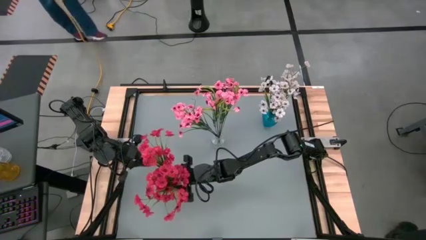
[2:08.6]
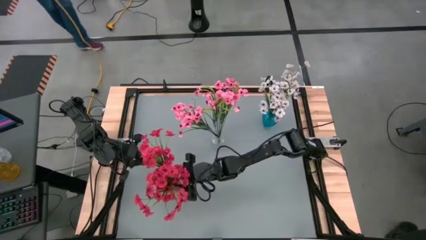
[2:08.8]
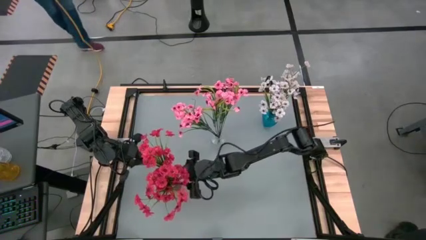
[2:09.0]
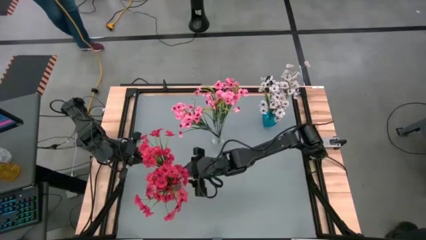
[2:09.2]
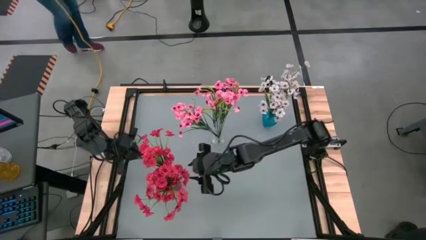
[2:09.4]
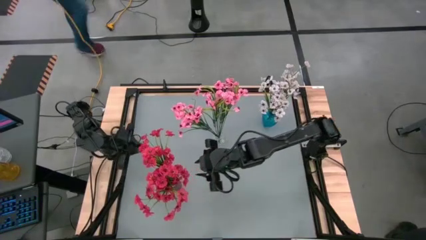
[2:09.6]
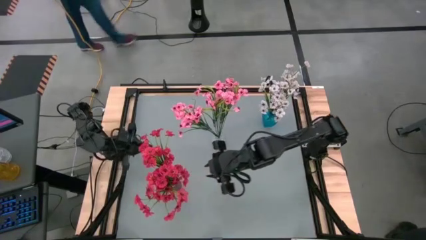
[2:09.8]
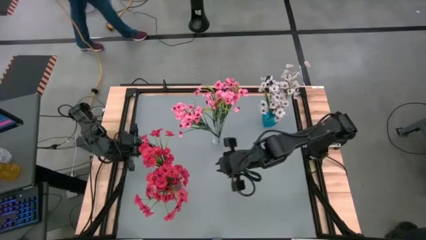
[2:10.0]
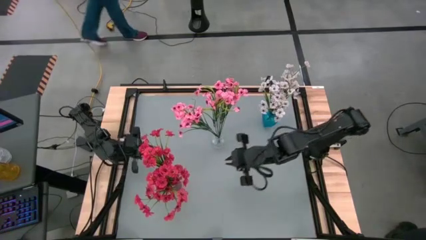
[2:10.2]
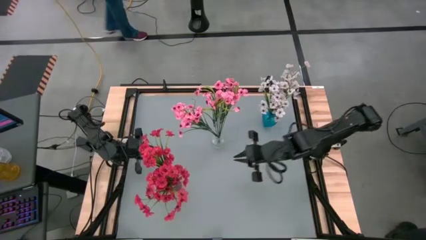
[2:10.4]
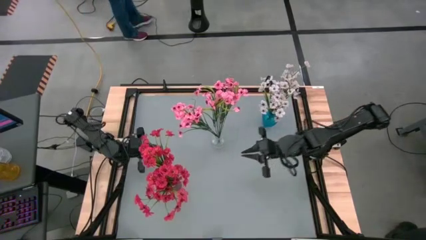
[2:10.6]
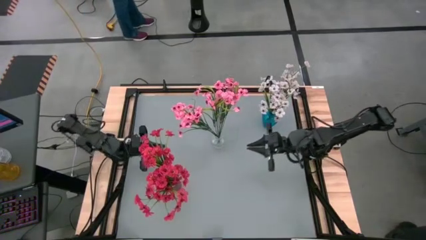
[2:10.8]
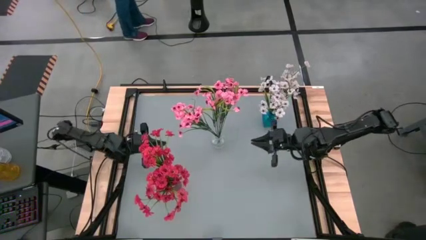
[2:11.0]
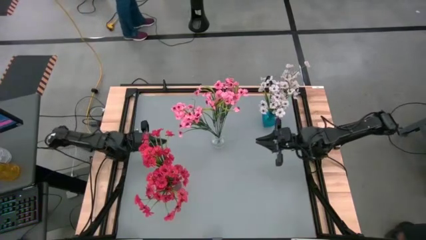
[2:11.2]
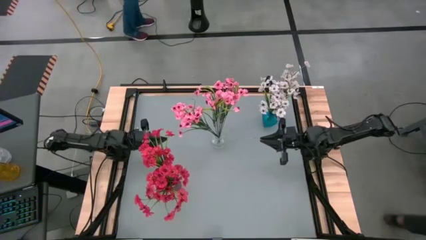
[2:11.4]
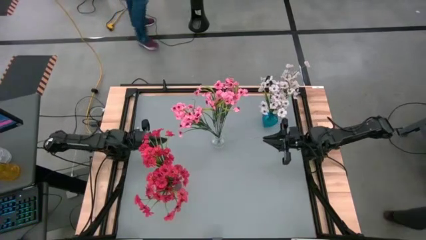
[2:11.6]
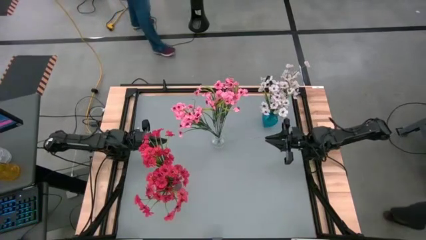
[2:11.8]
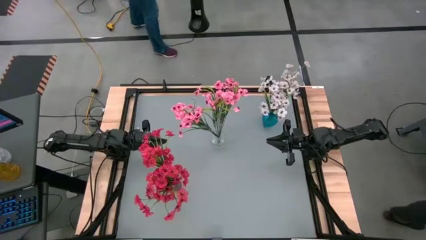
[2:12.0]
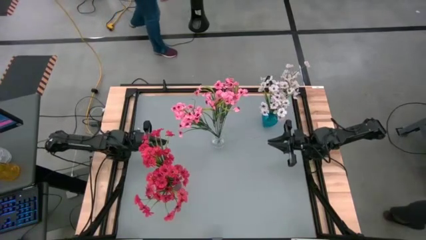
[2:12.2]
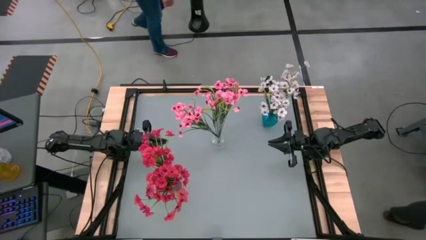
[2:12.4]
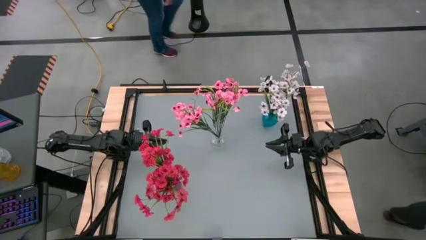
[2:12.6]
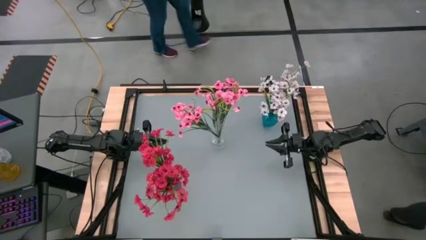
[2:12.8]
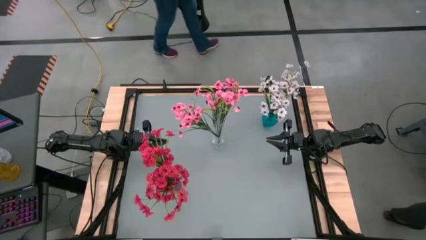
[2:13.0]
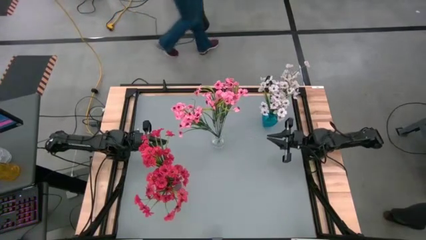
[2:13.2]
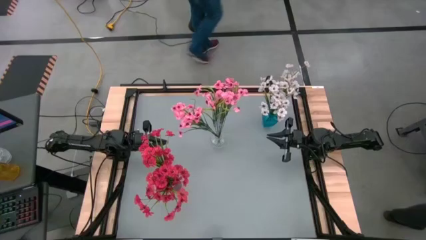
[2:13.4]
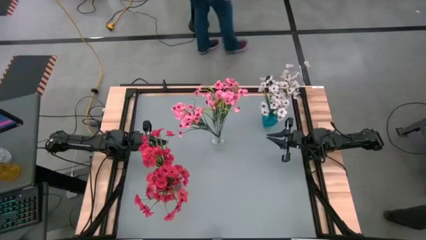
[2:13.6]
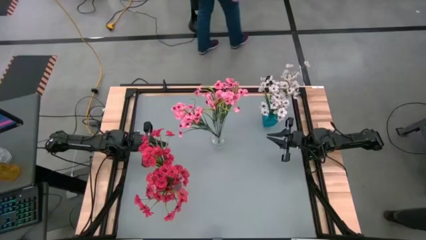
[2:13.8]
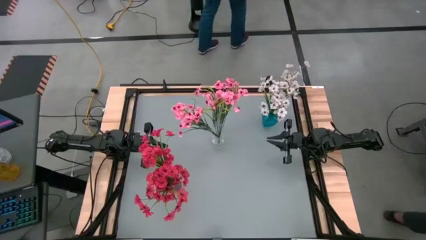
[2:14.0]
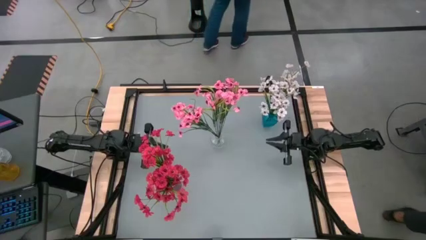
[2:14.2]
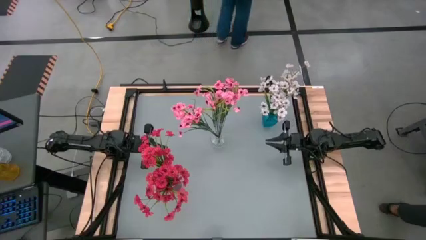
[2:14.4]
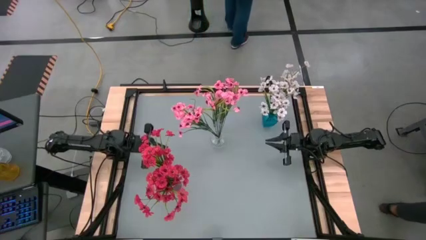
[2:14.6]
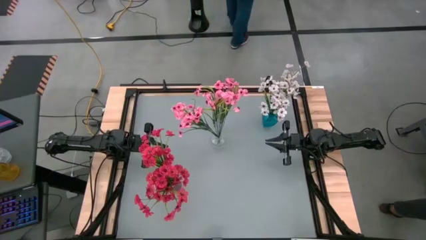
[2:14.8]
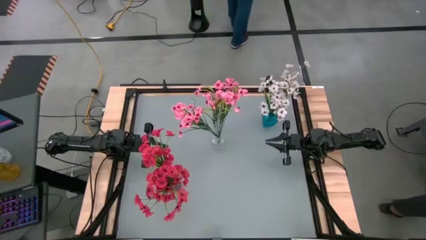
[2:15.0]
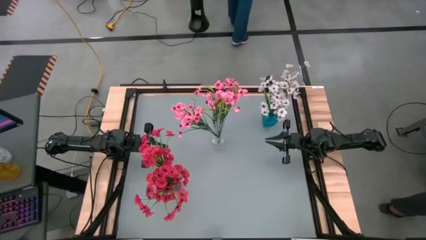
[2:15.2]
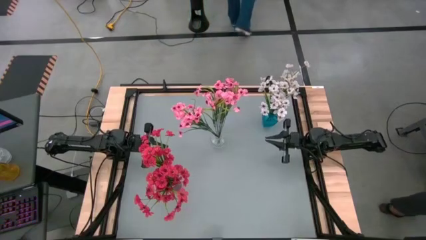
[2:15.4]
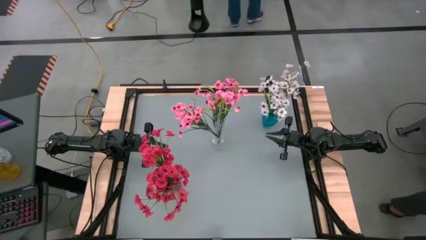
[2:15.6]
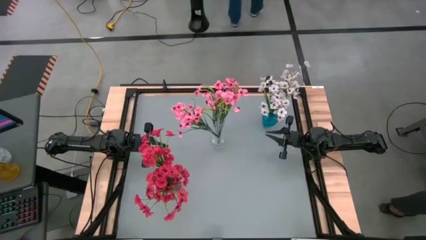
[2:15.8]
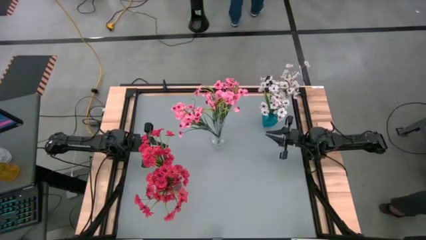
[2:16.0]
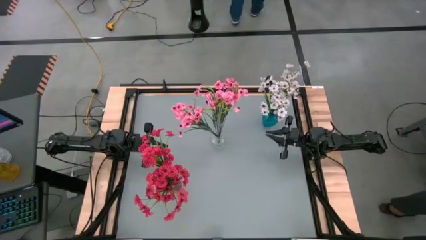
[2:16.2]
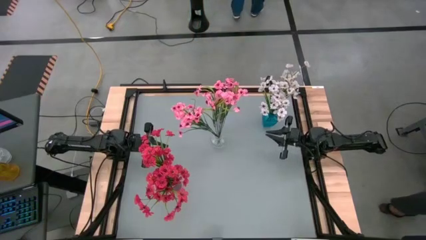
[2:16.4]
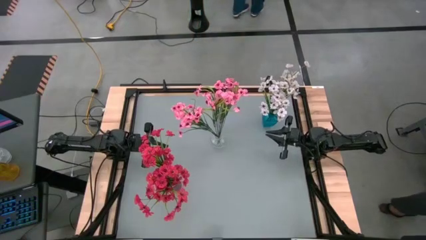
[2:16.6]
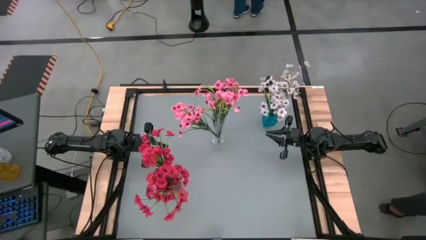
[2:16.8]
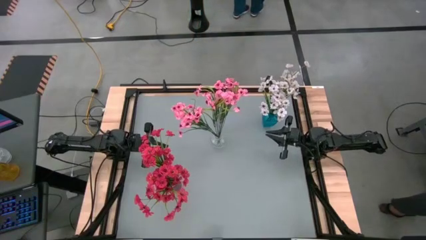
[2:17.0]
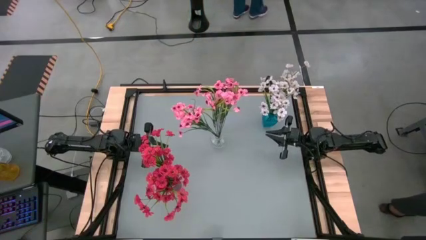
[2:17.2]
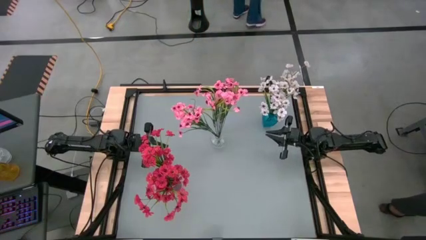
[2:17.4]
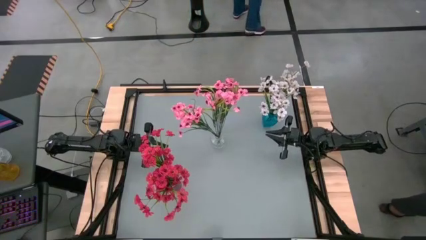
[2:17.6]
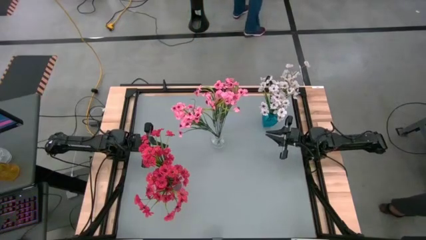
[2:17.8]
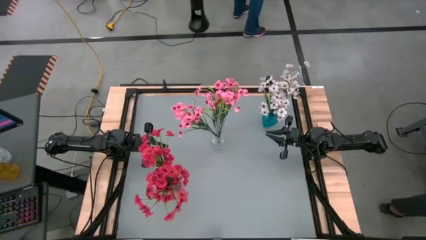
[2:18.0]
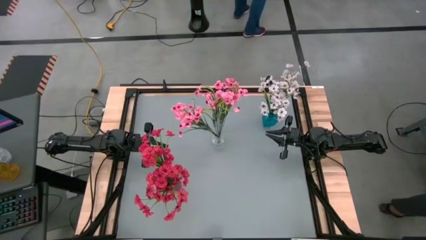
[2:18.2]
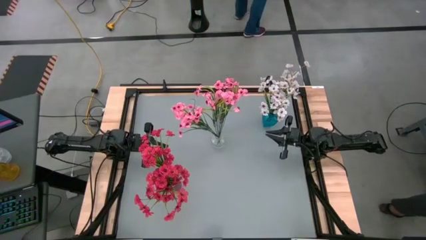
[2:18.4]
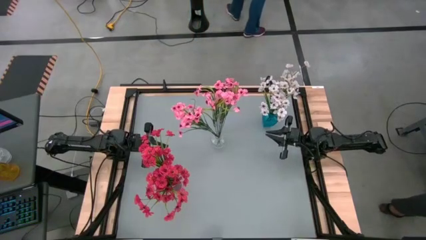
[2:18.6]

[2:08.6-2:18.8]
Task: Sort flowers into vase by color
Return to home position

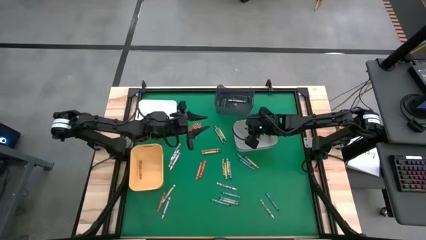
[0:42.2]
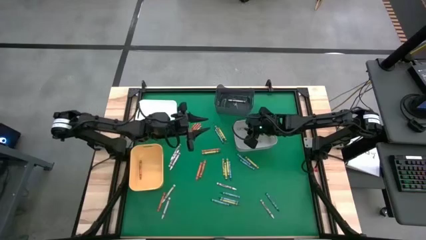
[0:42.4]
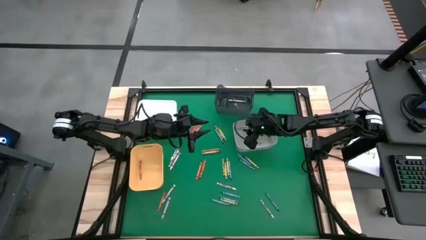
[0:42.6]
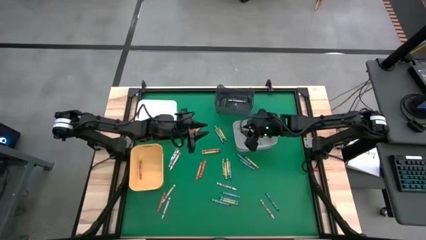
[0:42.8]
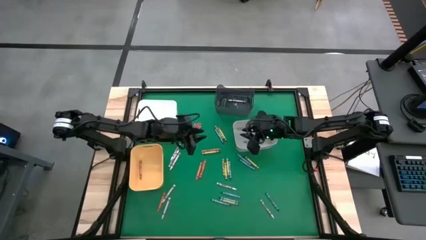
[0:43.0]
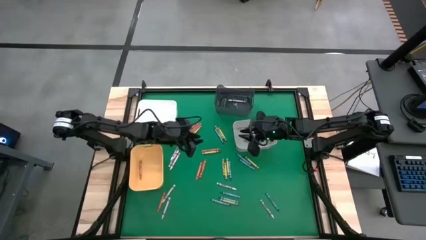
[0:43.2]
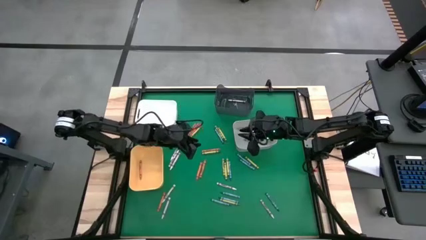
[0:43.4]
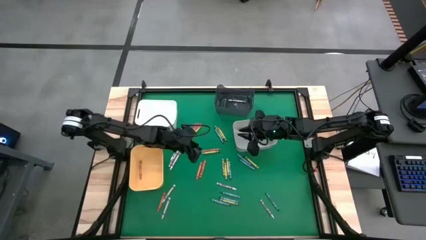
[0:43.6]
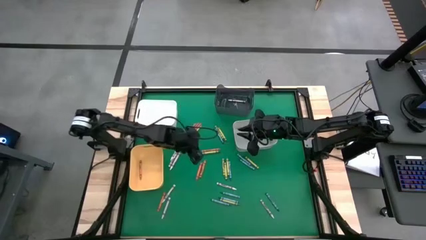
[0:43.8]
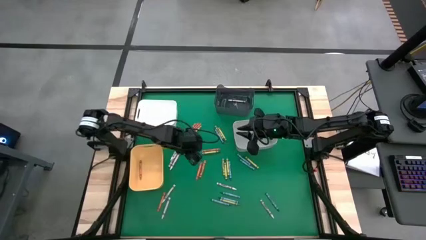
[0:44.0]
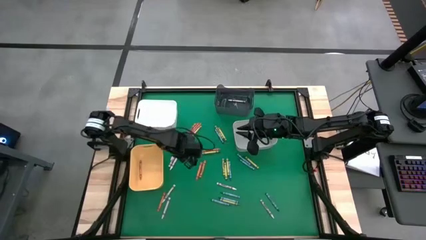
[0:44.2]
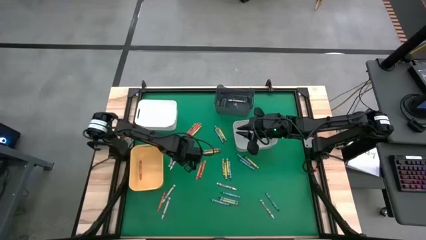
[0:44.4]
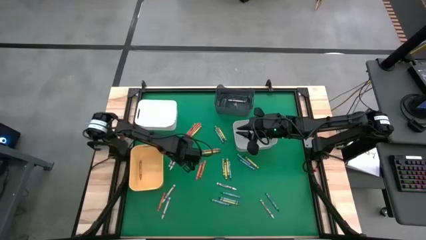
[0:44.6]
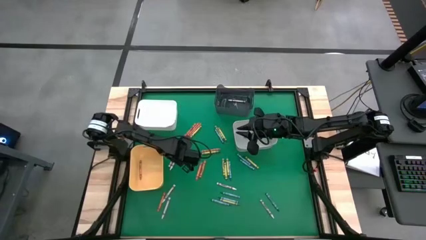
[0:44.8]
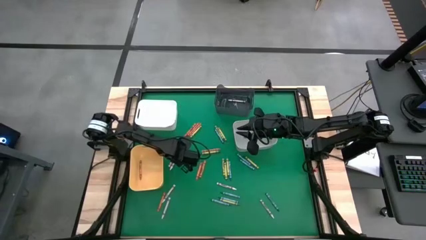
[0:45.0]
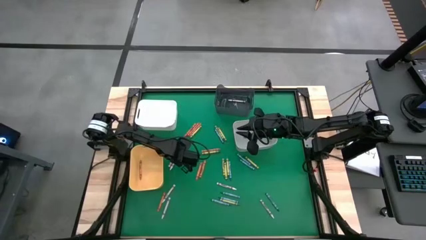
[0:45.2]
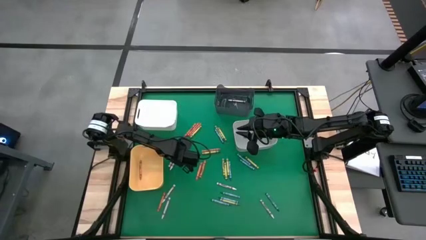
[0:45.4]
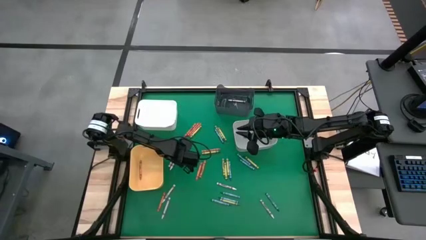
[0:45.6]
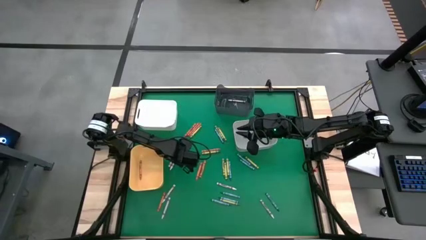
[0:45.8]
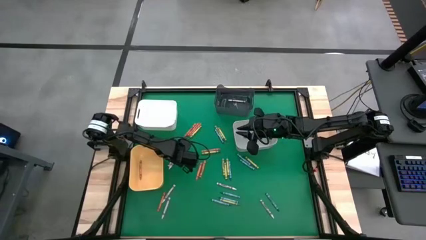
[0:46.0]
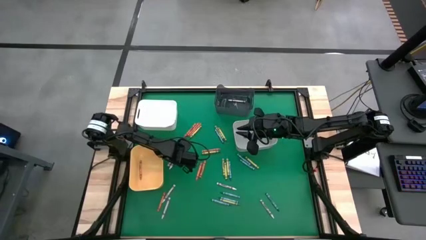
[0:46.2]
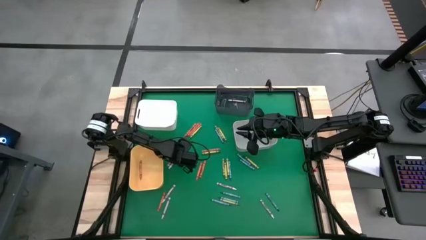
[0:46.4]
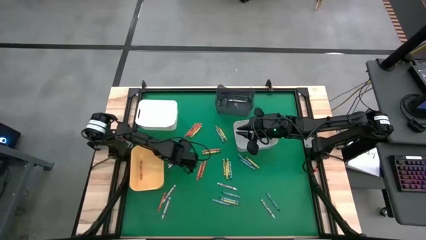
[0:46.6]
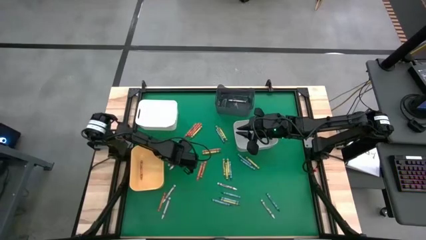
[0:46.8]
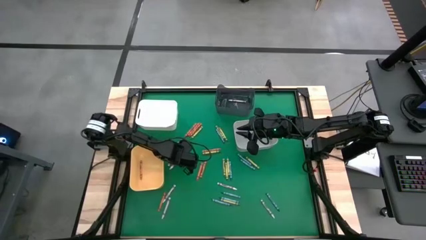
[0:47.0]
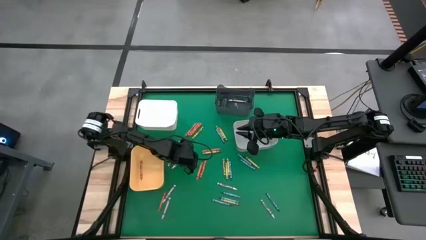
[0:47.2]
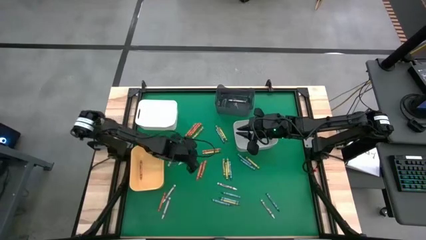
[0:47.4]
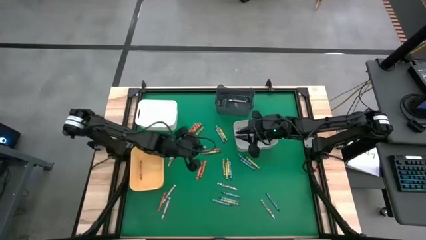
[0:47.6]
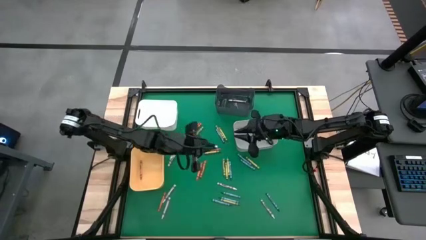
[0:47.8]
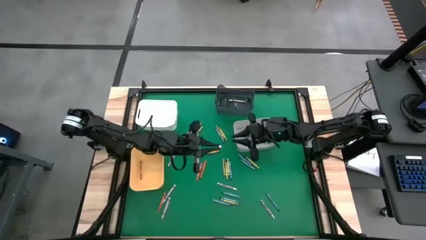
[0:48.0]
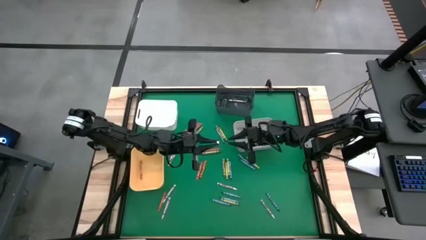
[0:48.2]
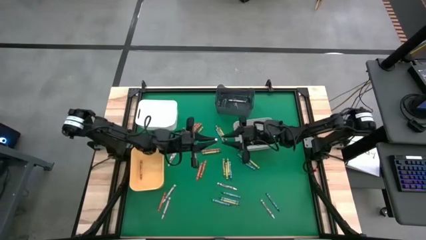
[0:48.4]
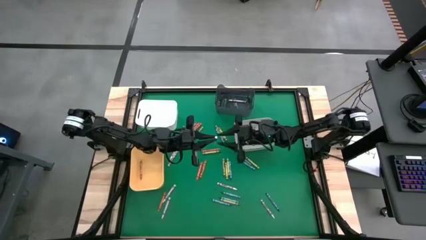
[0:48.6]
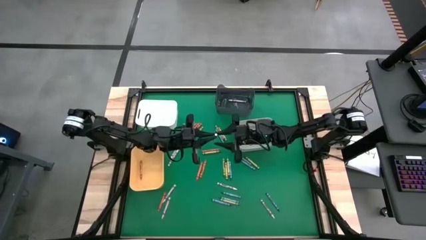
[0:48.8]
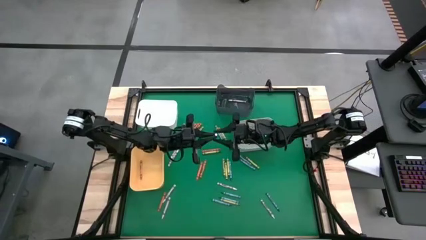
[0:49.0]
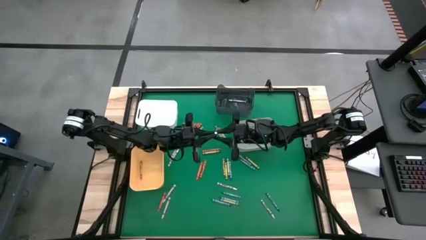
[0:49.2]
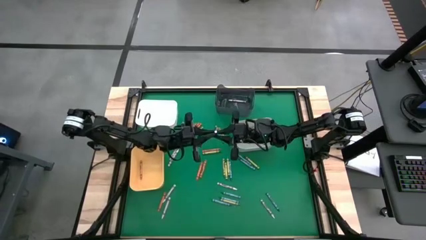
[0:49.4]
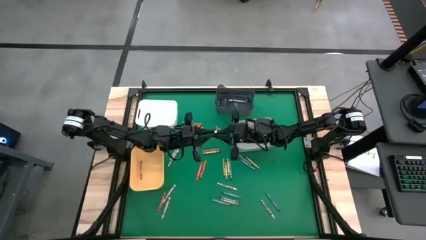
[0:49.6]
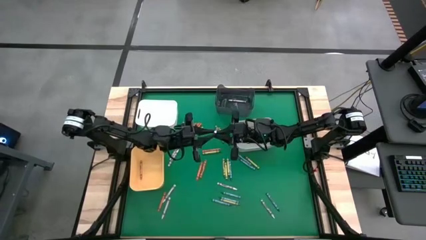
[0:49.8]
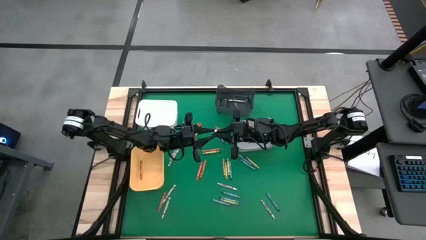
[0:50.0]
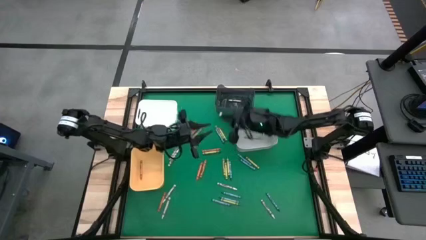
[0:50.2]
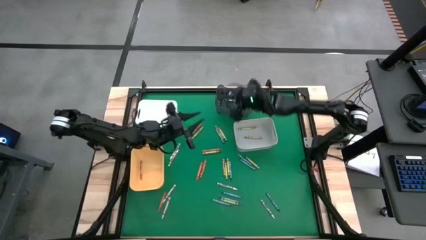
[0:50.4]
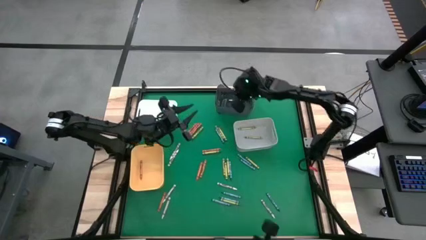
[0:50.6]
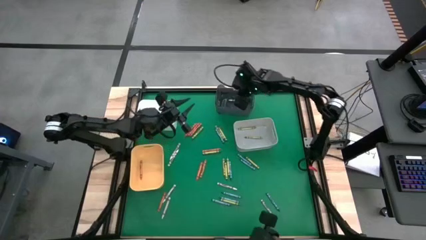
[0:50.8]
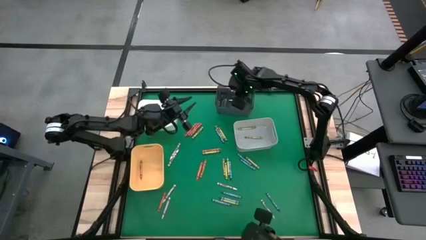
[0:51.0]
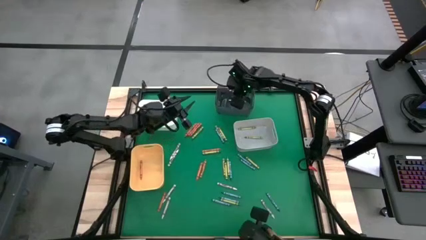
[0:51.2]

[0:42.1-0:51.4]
Task: Sort crayons
Put the white crayon into the black bin
